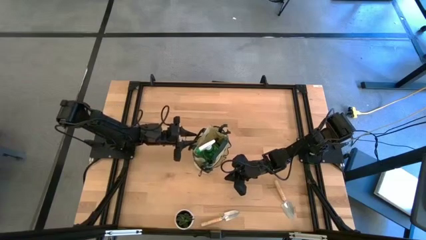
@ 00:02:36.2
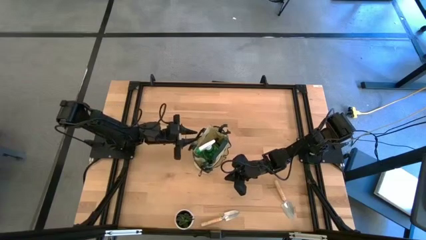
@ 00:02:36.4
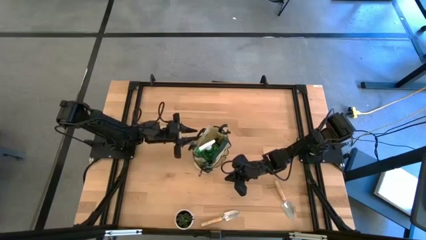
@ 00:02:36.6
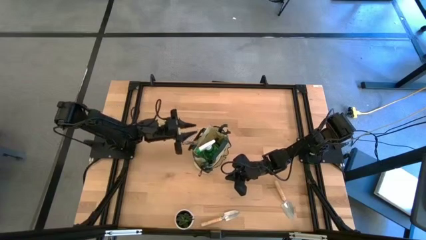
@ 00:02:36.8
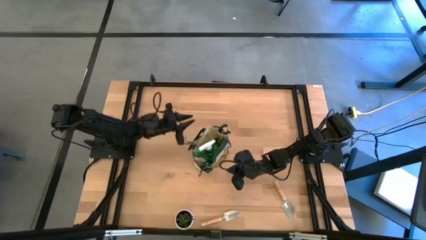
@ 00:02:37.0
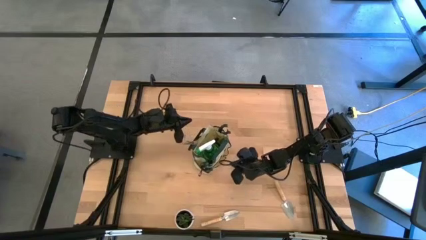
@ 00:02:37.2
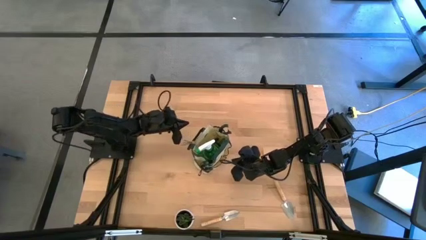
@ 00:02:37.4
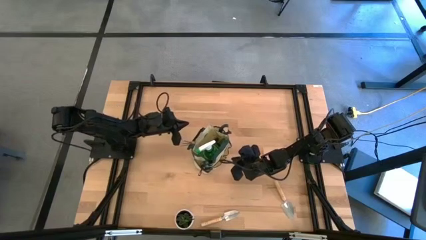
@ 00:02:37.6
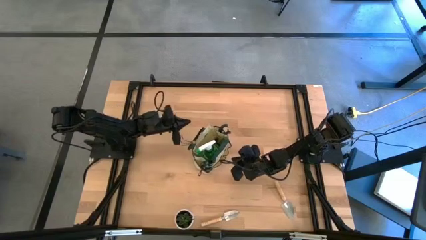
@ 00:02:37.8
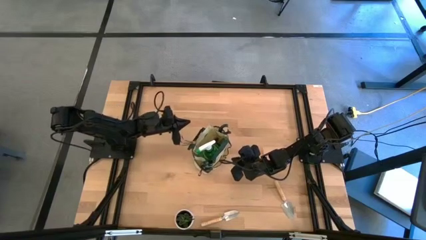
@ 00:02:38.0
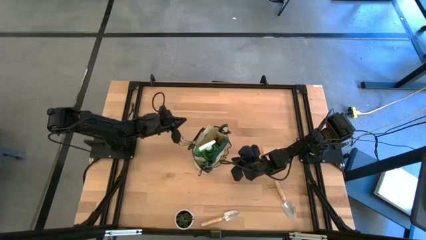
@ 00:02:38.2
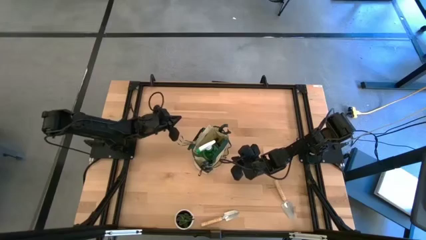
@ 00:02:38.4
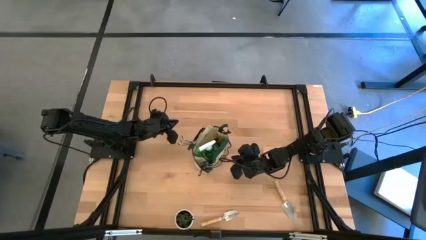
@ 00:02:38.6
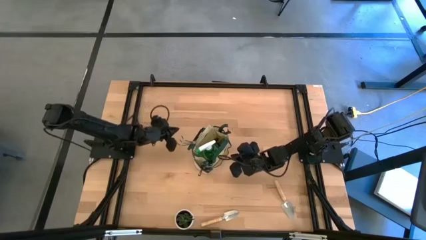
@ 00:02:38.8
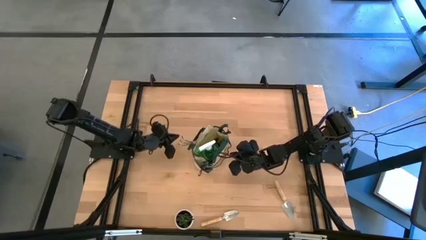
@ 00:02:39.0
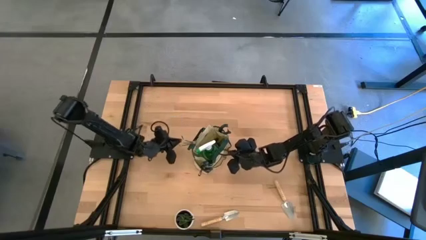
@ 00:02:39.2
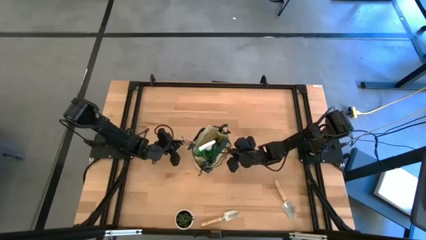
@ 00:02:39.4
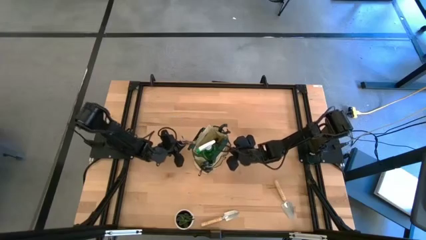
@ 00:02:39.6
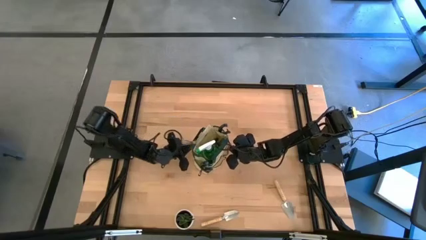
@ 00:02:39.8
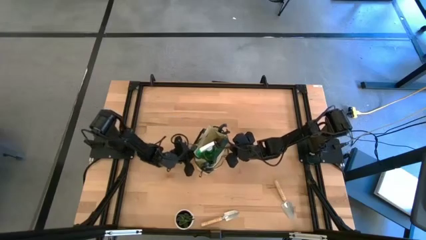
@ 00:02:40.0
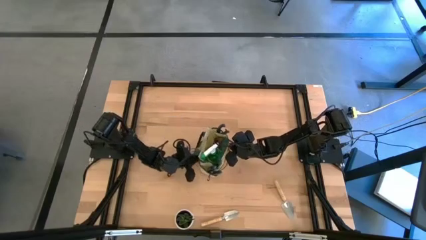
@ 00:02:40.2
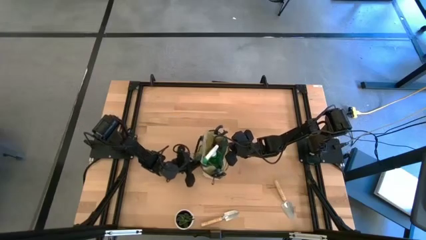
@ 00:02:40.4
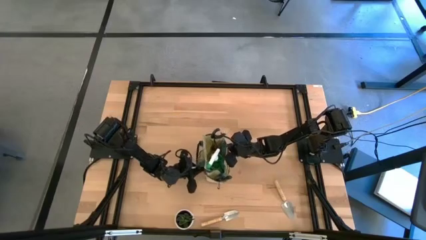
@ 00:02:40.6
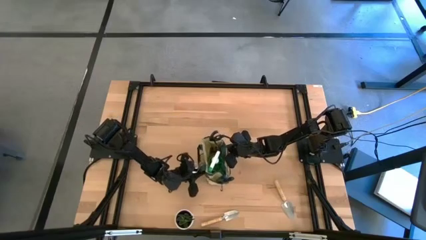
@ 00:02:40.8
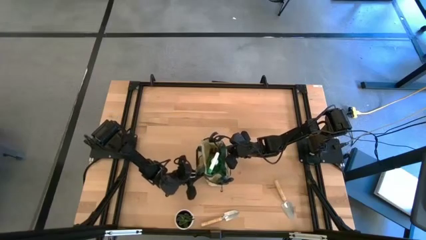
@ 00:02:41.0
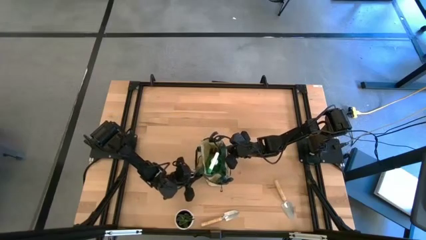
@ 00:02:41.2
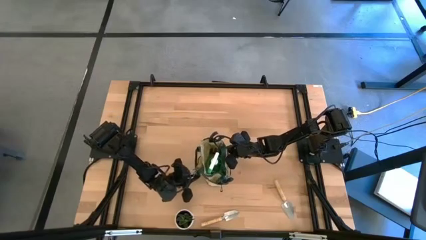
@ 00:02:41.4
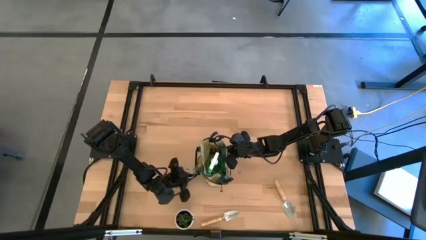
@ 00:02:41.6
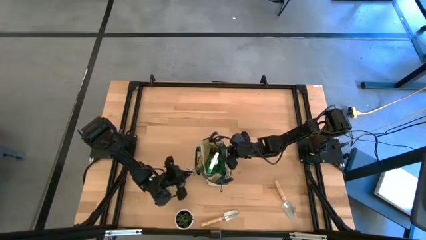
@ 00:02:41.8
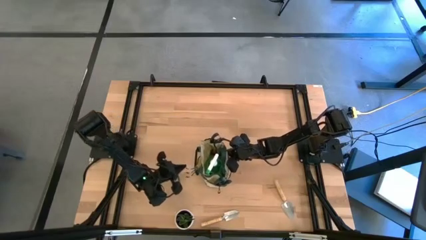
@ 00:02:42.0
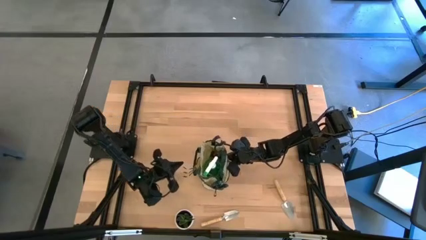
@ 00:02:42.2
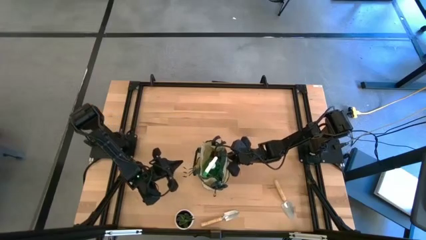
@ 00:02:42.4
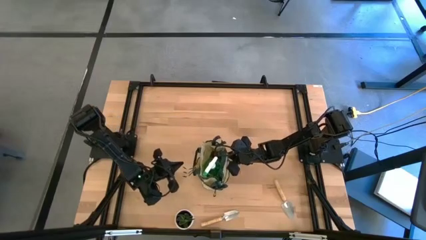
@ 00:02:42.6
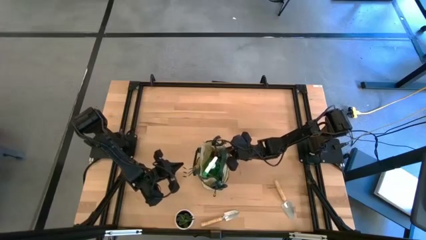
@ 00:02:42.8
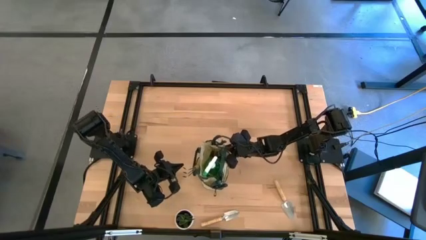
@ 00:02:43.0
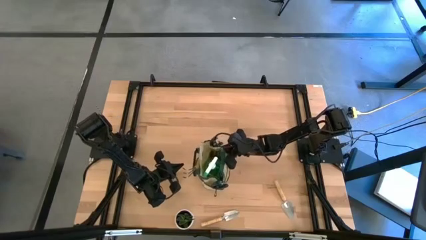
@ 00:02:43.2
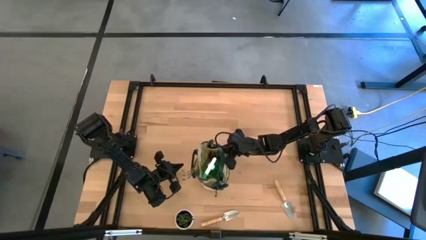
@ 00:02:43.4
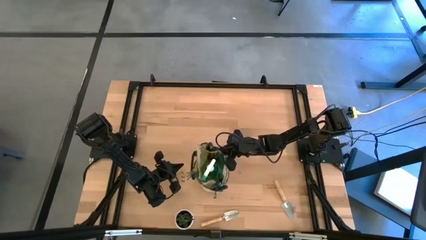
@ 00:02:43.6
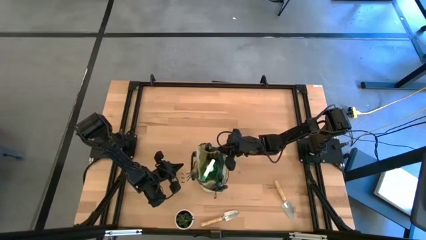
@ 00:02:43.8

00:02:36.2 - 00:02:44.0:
Task: Pick & Place Garden tools in Gardening bag
Adjust the green gardening bag

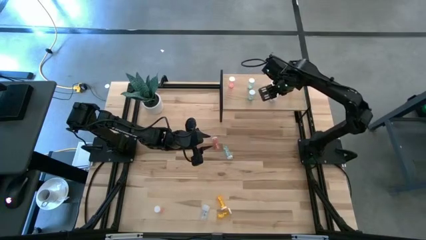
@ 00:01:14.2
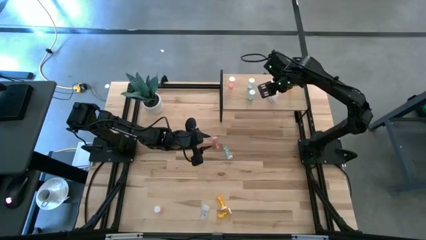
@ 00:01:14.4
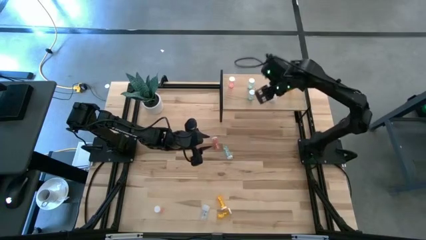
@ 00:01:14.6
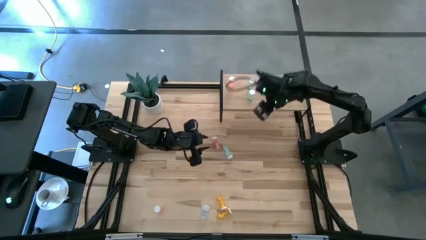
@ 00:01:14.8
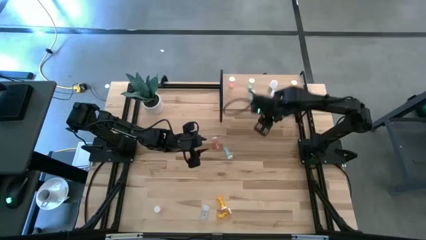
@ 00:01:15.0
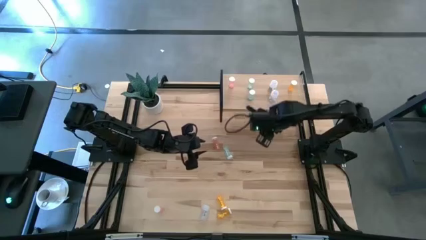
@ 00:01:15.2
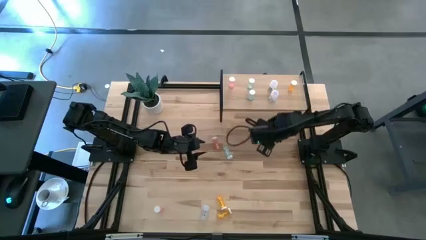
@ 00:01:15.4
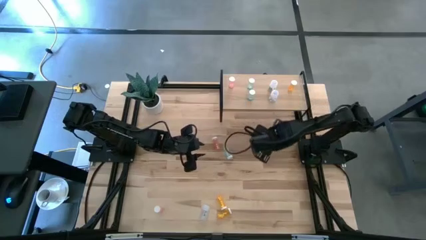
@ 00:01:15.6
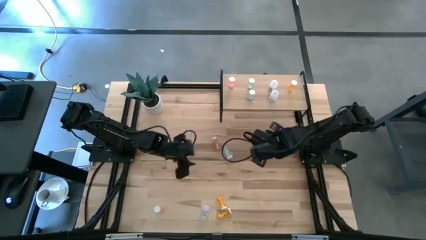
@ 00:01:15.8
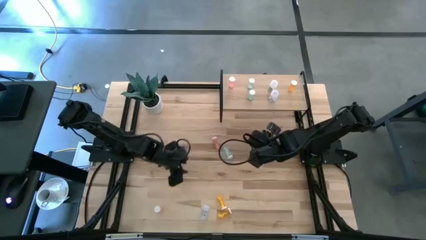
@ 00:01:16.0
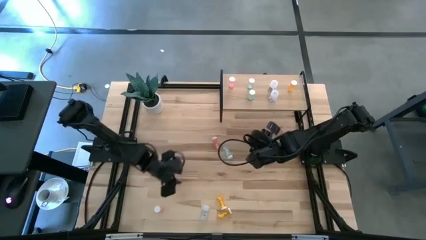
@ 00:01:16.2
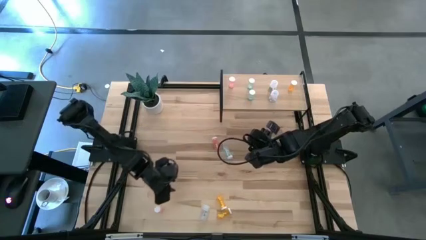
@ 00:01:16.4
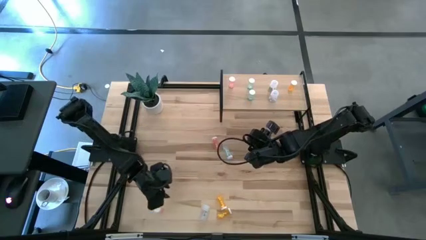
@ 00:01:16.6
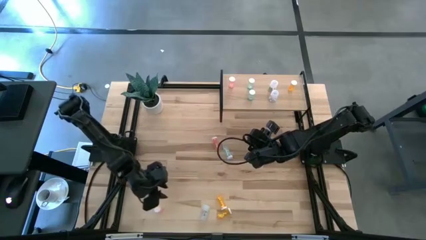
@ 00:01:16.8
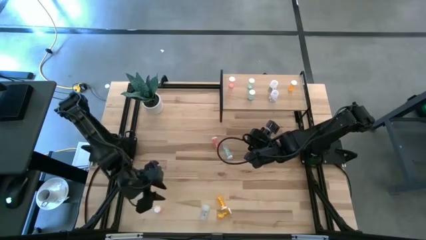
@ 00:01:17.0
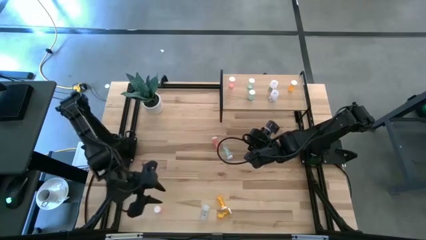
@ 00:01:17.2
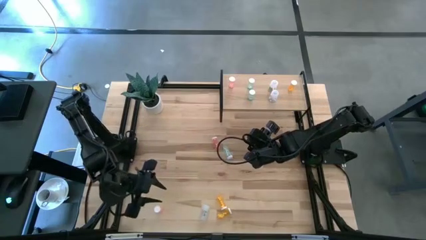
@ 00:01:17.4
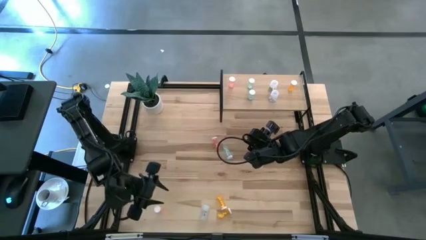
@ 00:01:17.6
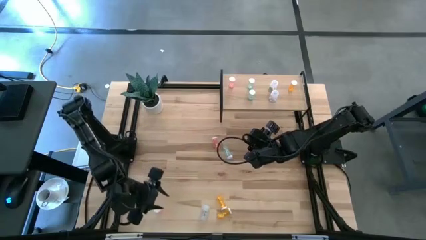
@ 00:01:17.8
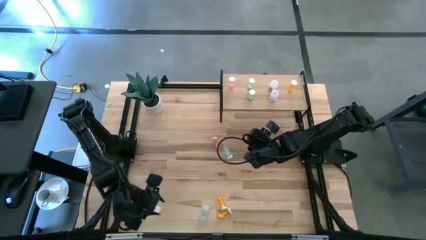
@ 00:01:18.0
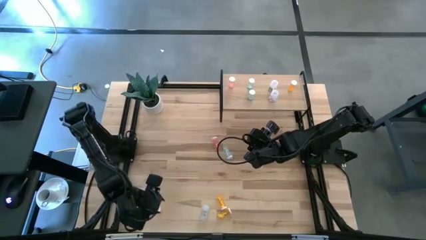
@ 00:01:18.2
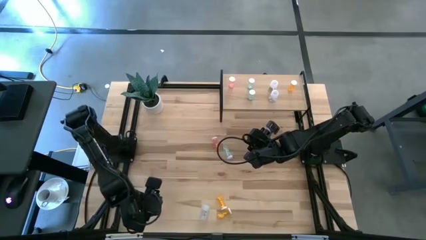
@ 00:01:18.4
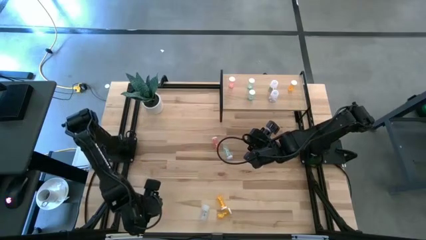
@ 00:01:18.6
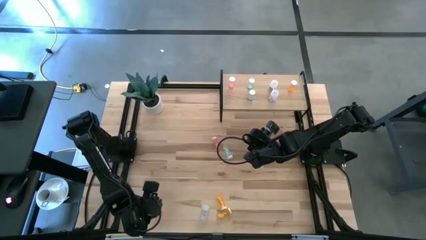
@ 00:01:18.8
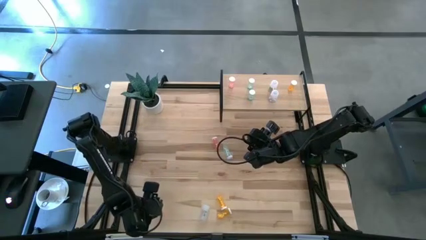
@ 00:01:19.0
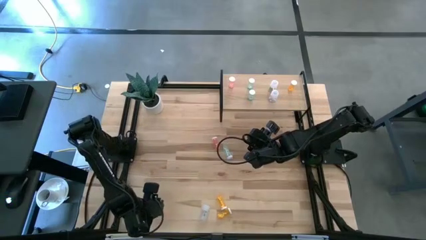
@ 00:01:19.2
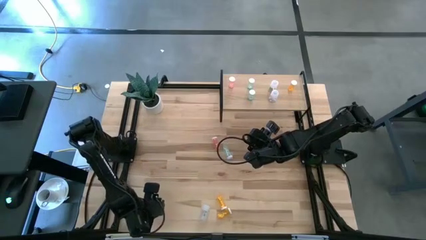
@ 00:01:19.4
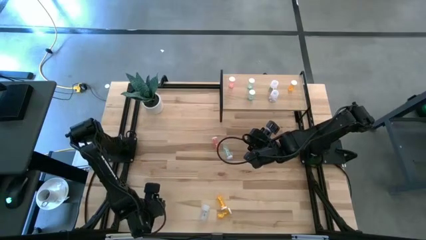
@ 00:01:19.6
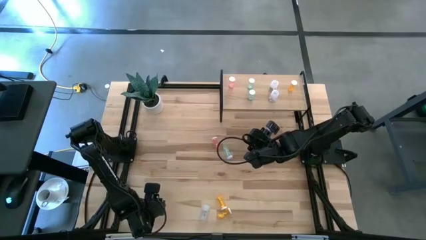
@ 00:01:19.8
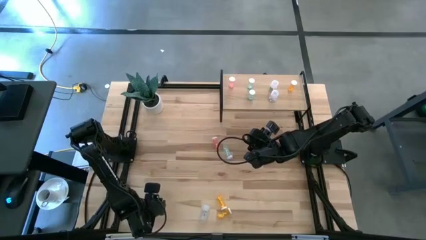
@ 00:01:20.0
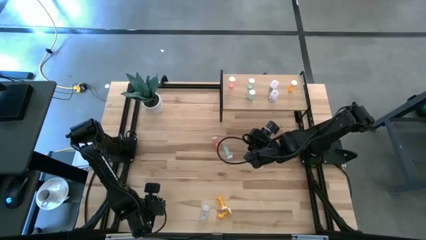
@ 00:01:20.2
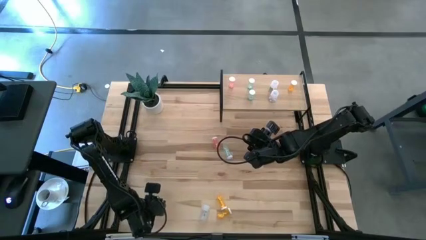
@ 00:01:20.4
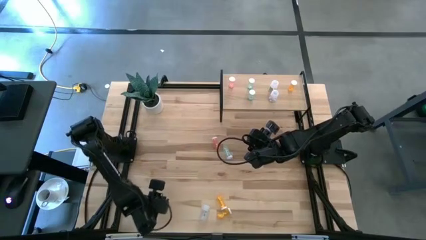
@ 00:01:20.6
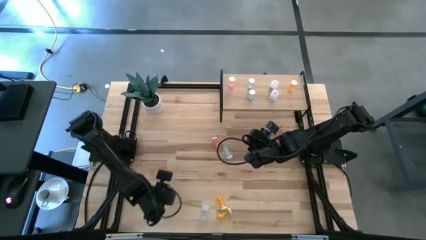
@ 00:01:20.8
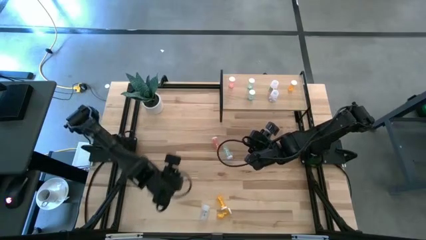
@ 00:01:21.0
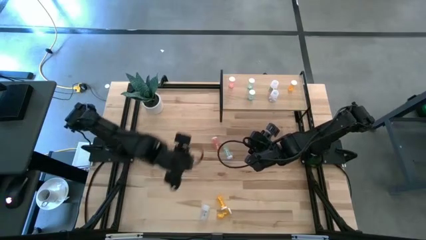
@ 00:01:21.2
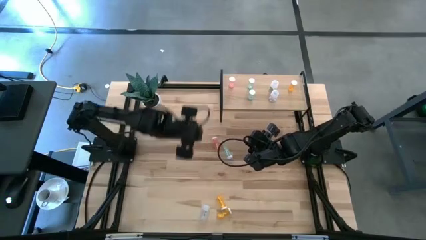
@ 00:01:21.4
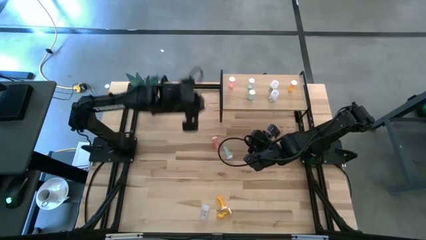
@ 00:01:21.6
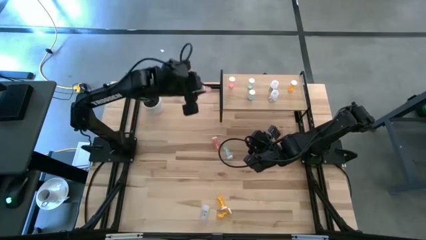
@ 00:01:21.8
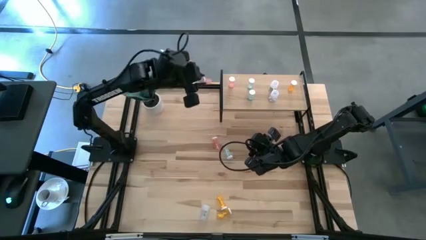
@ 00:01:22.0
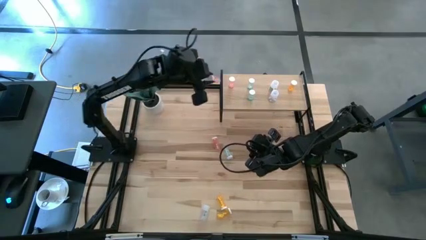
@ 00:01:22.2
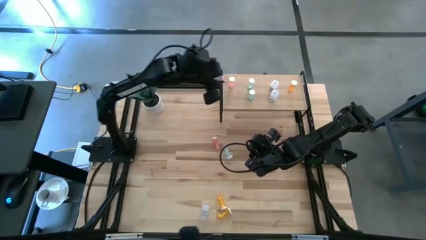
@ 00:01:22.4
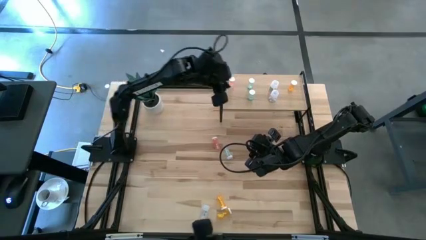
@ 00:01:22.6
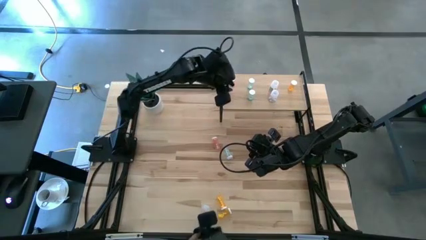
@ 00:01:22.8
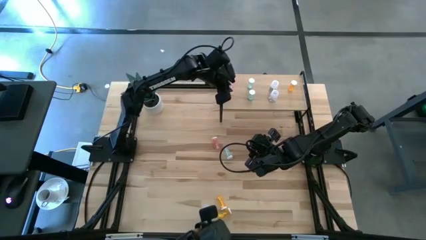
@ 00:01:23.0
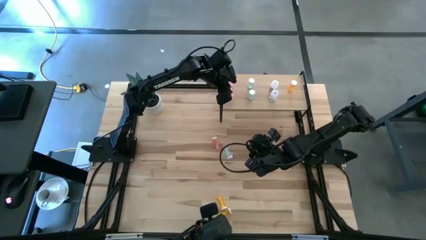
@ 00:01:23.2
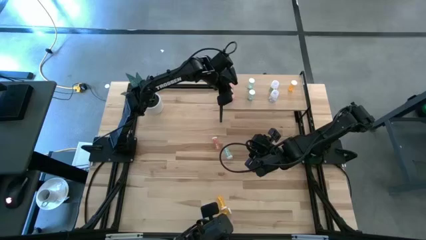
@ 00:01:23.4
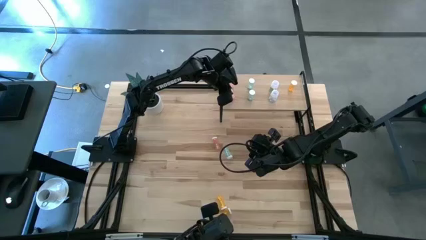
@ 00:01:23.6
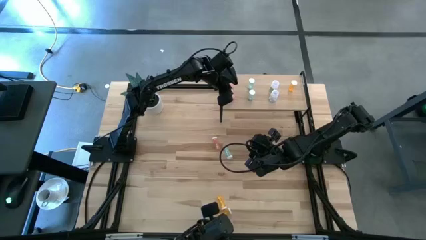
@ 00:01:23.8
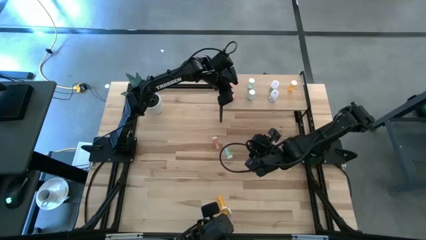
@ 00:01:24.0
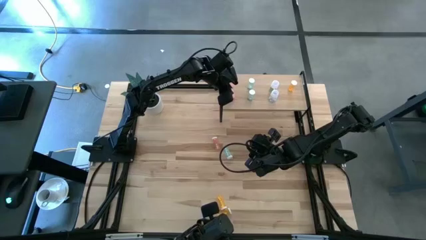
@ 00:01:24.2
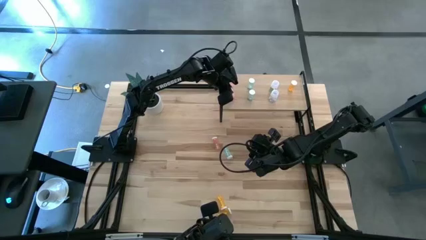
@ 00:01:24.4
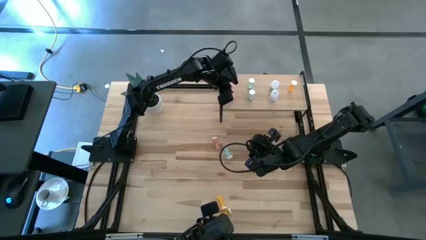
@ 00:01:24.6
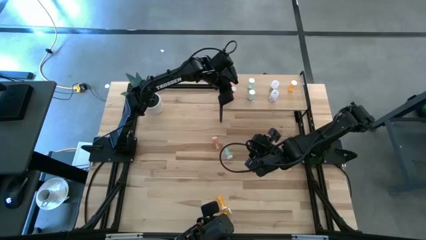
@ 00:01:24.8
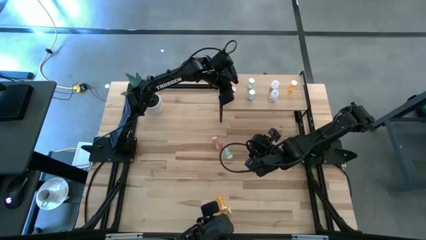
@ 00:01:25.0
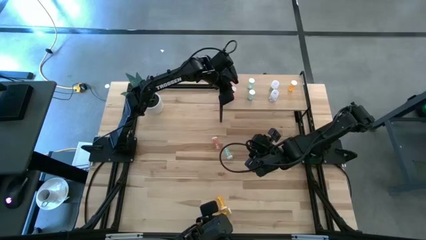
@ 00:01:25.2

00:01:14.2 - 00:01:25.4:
Task: Pick and place medicine bottles onto shelf by color
Put the bottom red pill bottle on the shelf aligned with the other red pill bottle
